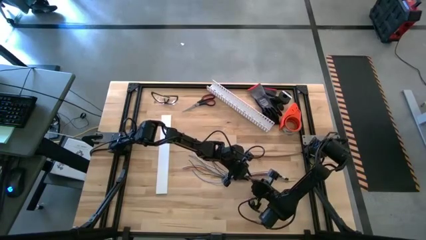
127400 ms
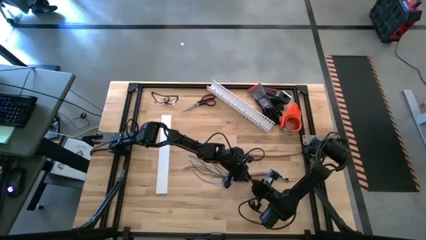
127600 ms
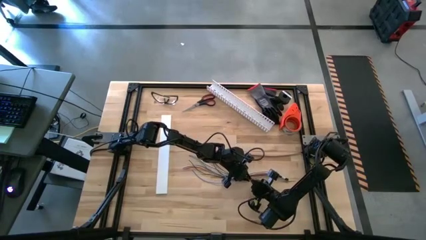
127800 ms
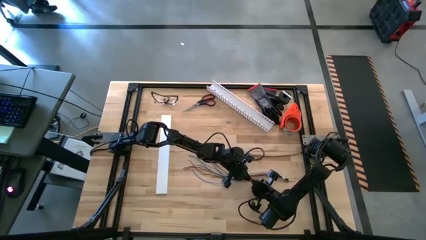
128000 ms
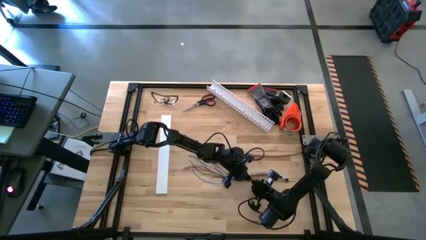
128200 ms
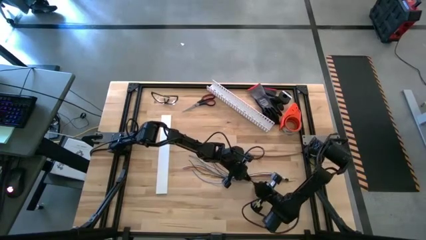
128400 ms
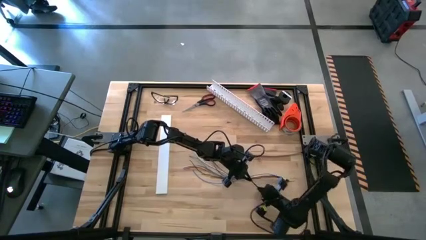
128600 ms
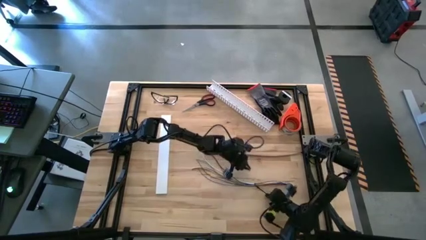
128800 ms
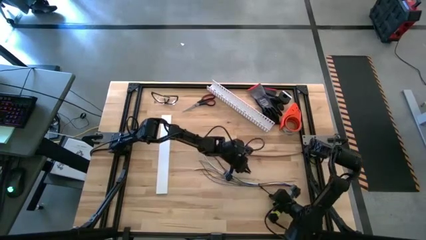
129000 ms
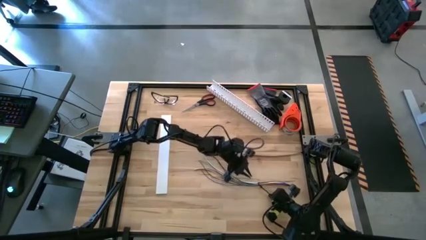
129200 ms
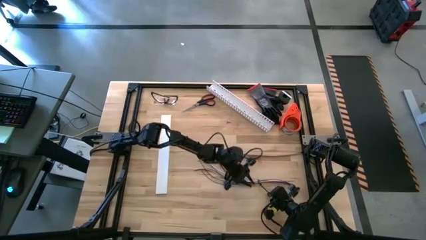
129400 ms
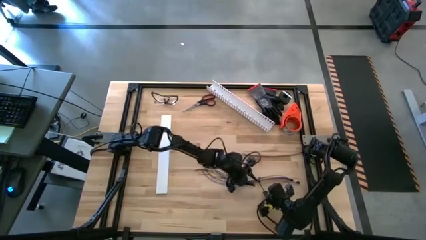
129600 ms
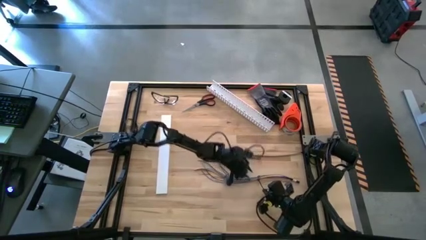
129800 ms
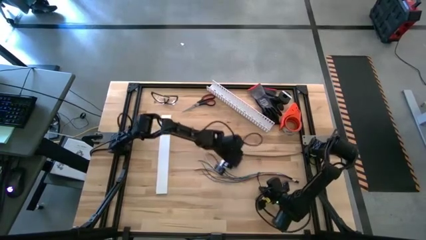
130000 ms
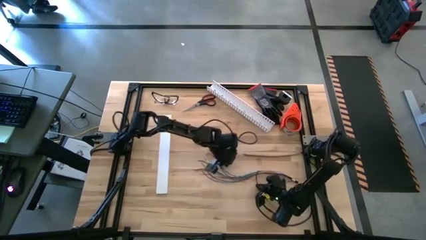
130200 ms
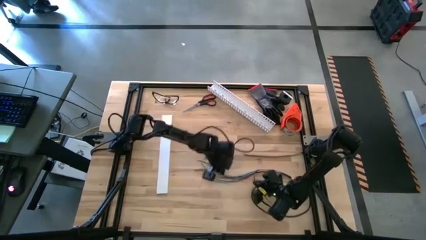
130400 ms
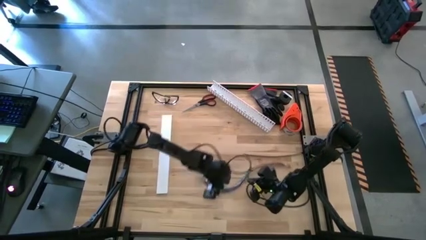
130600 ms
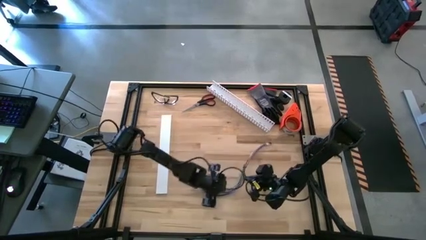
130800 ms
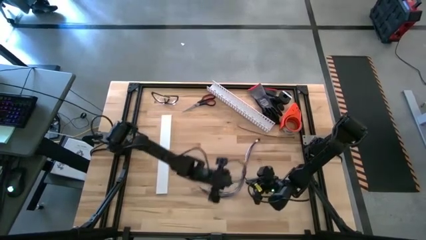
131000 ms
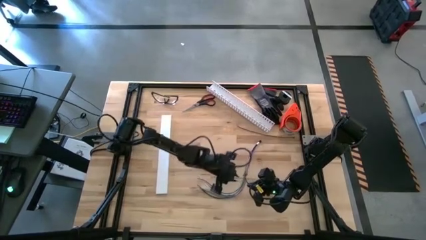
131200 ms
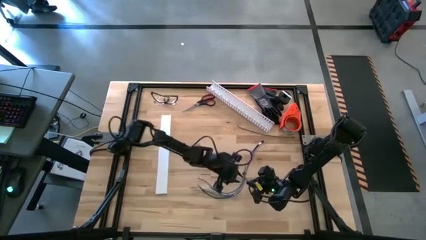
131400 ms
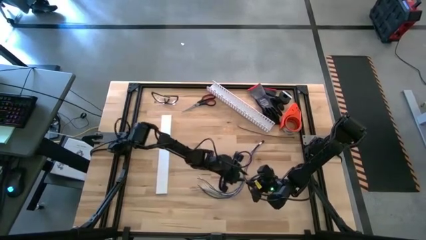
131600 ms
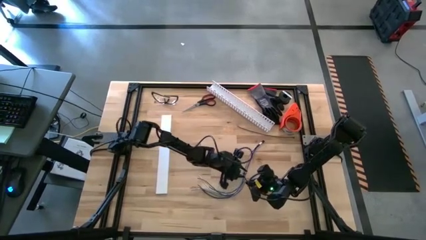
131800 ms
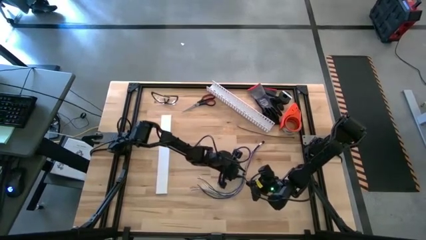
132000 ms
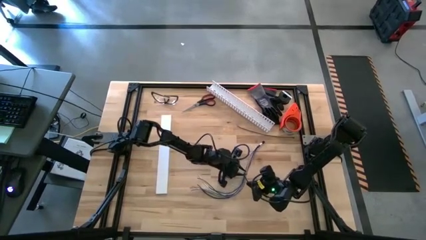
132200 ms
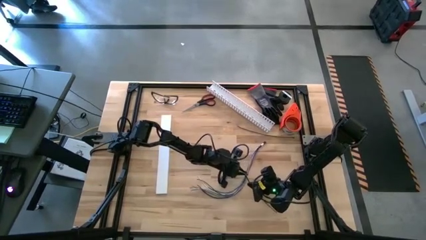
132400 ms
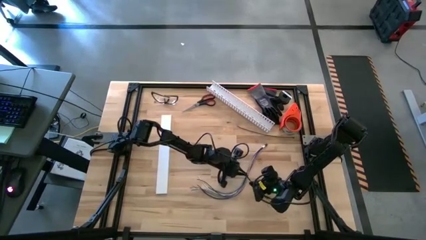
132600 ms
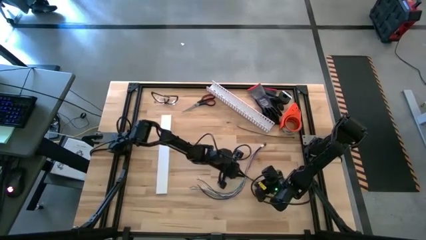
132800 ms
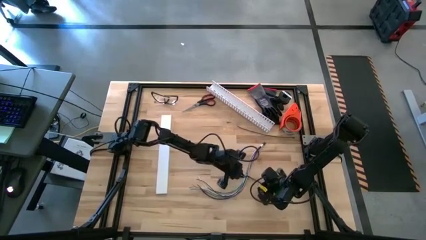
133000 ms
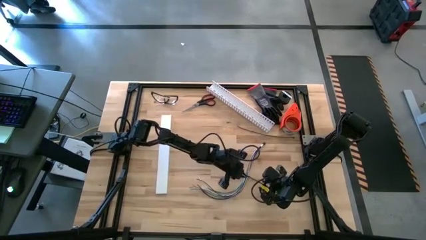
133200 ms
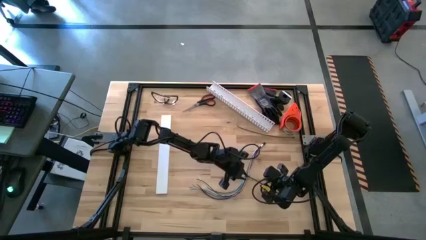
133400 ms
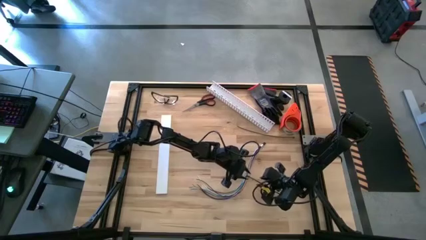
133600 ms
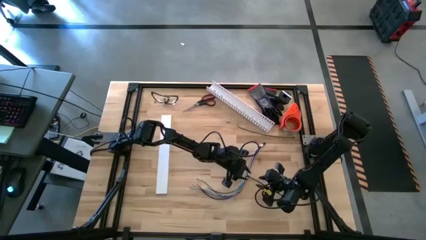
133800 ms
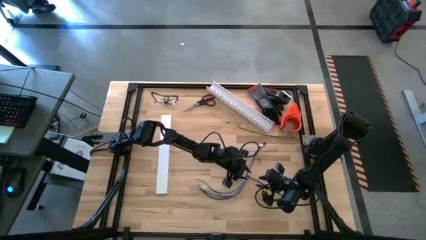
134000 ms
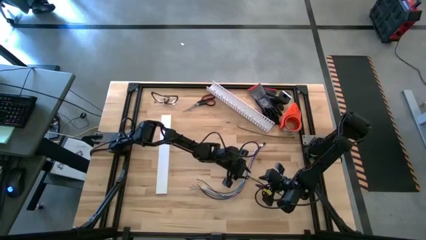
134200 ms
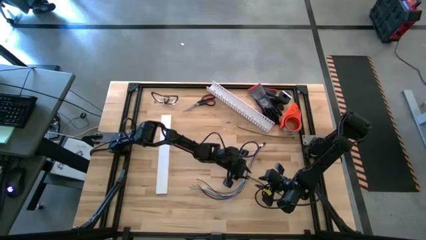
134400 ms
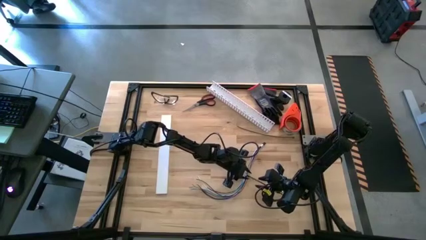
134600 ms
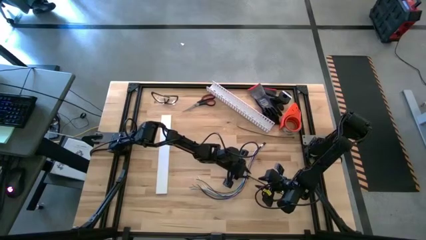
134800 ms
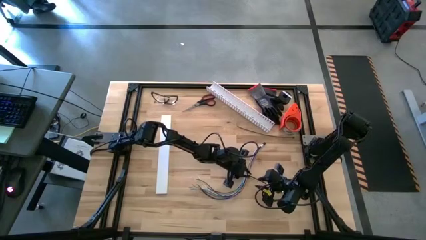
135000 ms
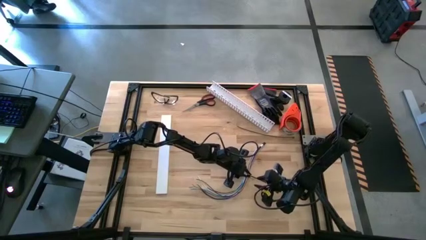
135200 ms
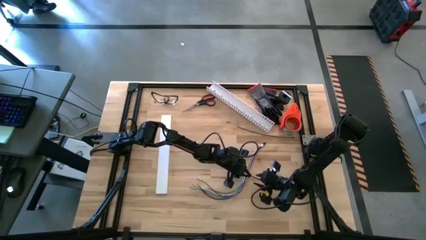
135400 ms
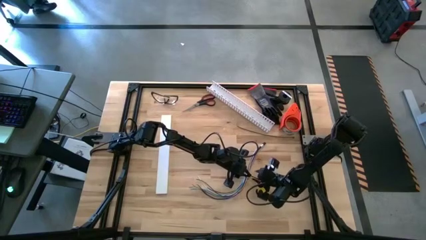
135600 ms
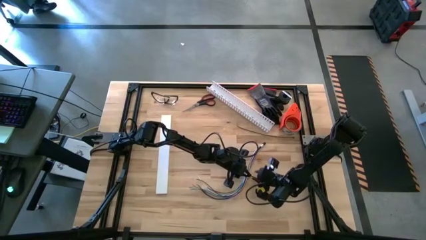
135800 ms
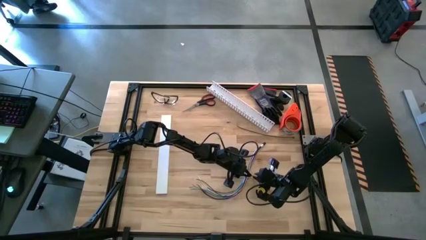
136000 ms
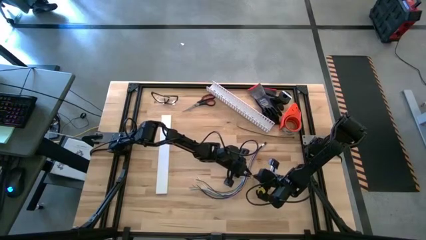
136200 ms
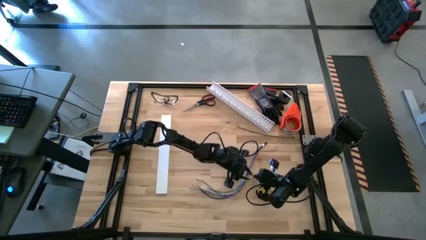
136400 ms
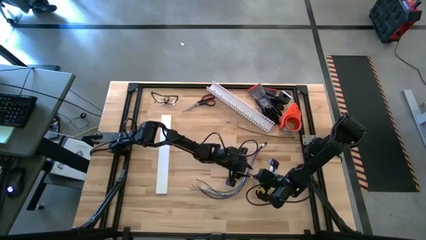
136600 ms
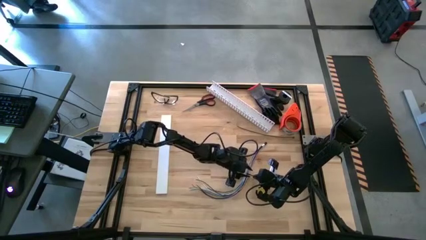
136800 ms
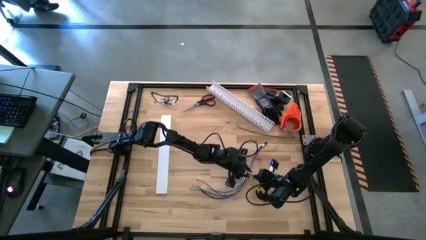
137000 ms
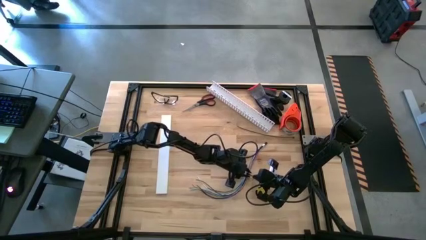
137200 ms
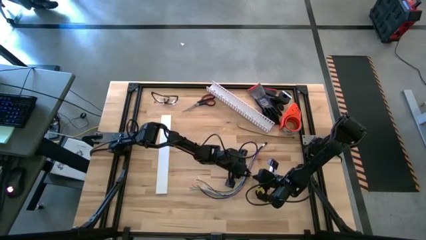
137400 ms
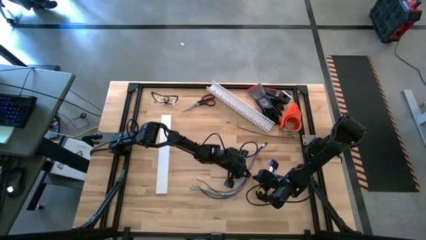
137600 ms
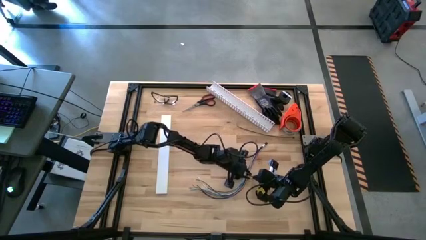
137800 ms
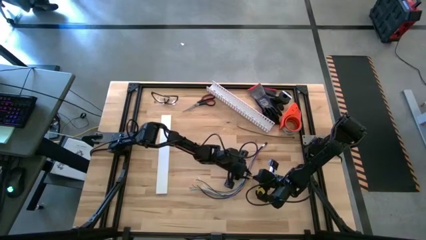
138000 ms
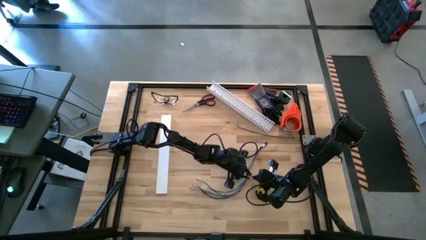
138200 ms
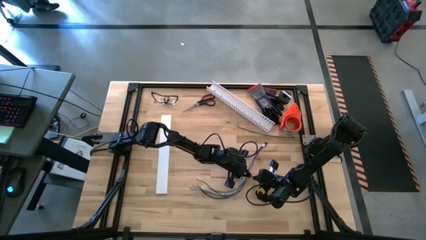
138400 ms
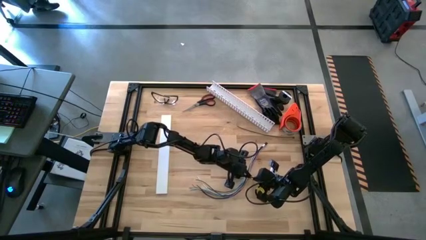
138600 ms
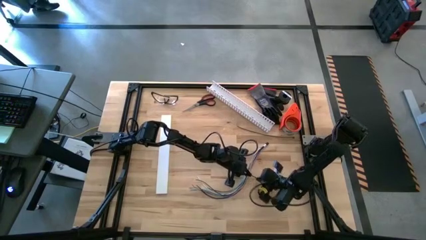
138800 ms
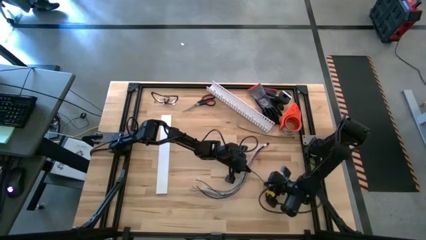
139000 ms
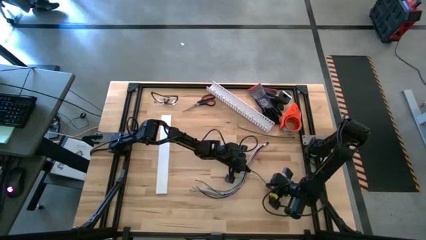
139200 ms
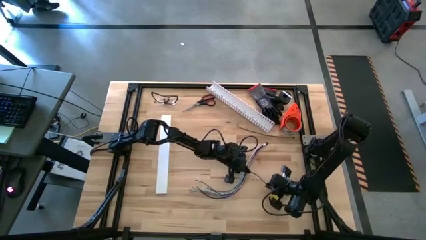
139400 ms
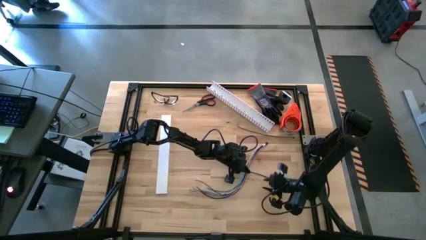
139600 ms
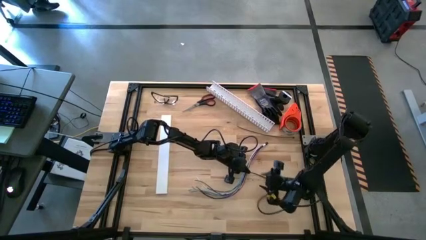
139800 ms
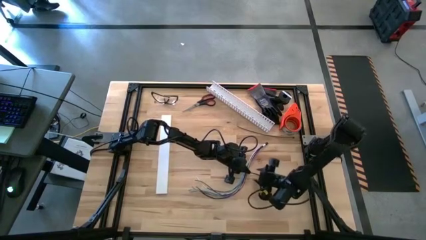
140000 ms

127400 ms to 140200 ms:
Task: Ziptie cables
Wrap the bottom black zip tie on the cable wires
